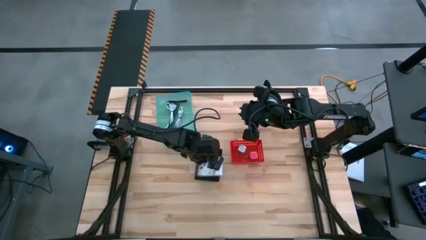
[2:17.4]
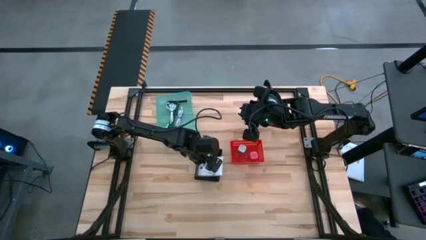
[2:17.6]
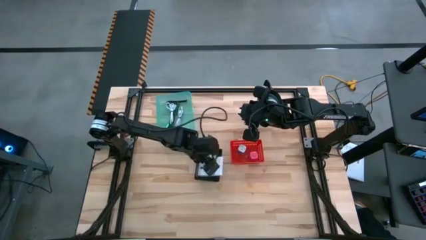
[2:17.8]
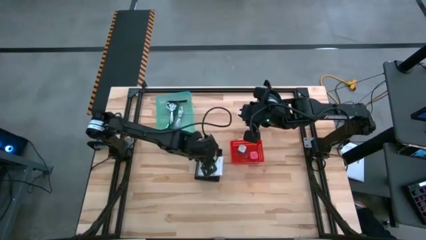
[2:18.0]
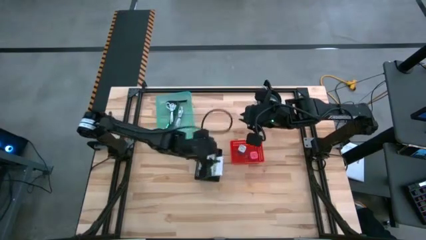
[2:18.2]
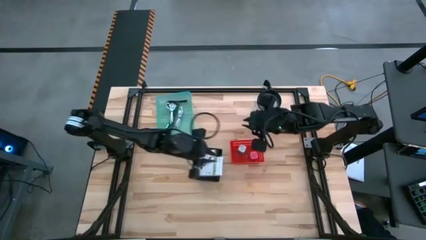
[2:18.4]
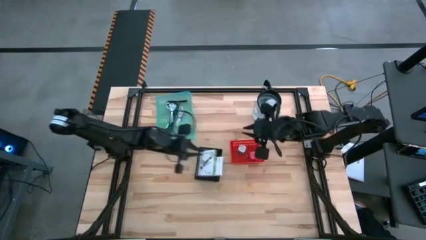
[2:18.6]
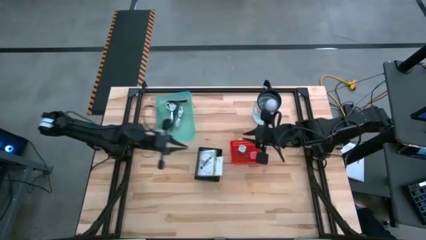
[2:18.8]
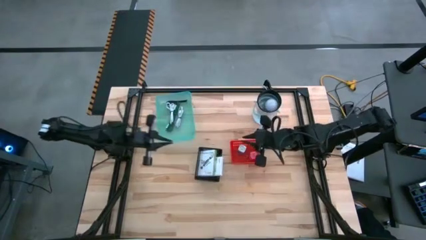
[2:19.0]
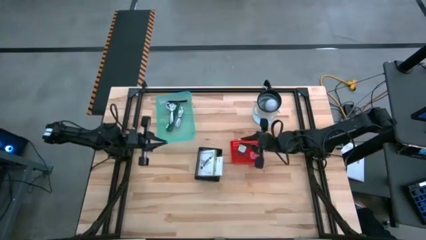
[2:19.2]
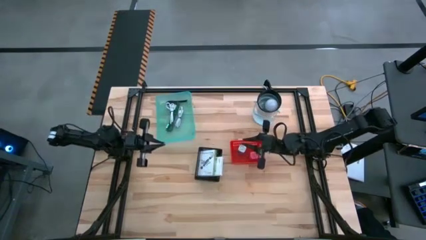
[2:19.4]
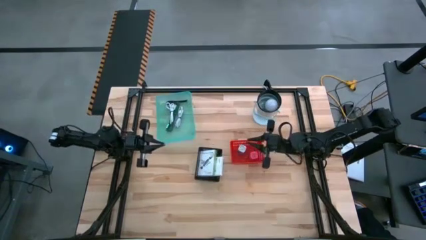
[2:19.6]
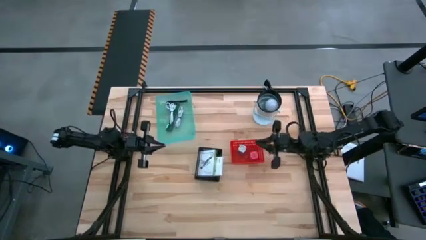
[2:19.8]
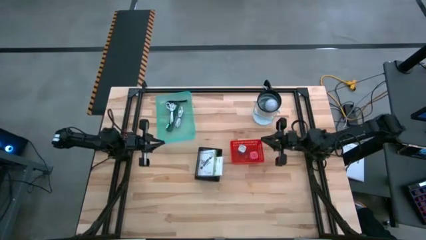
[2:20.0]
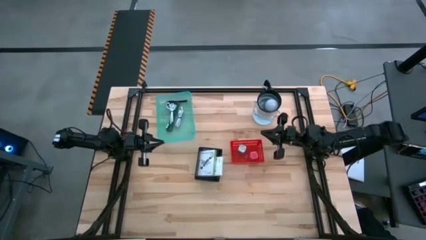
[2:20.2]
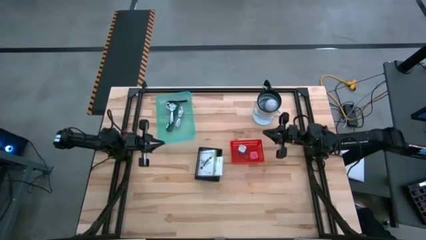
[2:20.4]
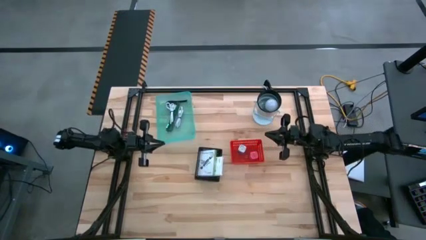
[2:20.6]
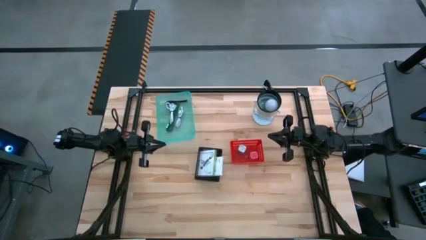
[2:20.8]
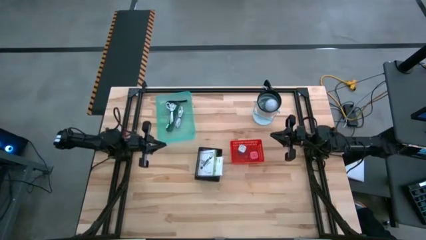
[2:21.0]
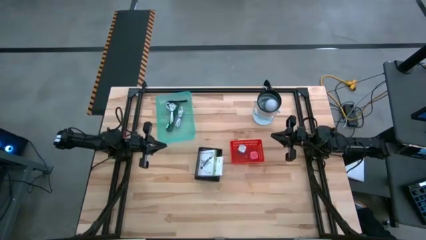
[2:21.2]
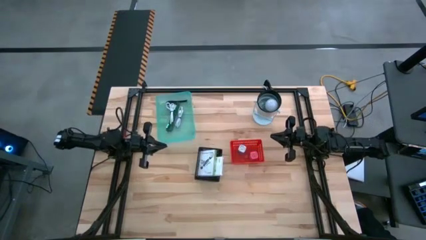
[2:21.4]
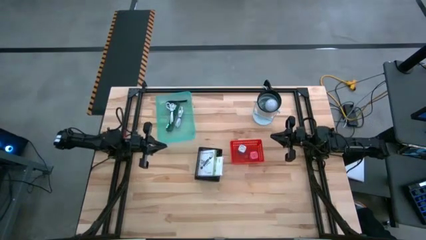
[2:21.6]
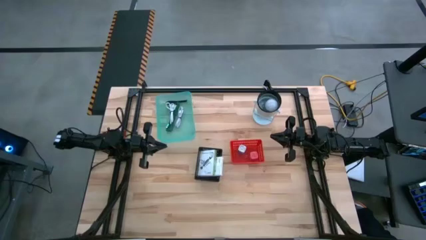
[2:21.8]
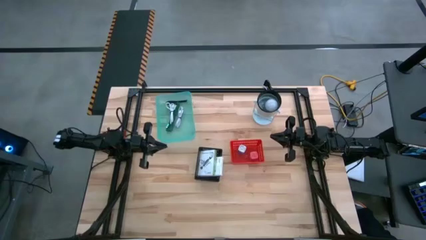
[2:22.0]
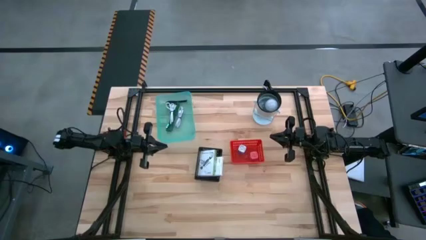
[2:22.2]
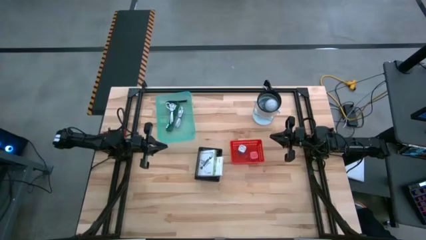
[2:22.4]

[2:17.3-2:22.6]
Task: Pick and place items into bin
Return to Home Position

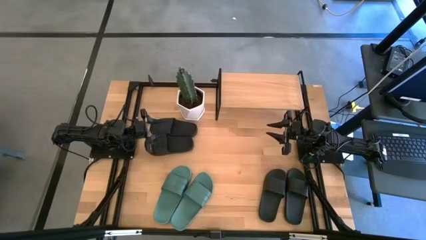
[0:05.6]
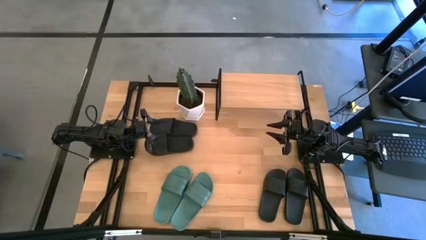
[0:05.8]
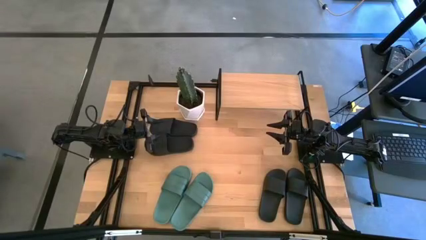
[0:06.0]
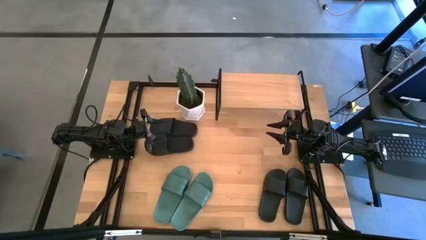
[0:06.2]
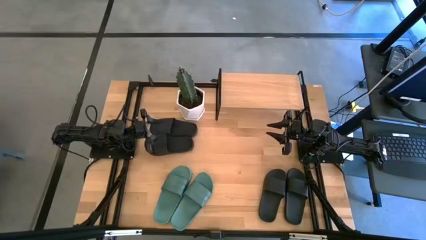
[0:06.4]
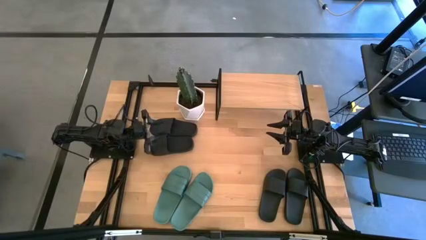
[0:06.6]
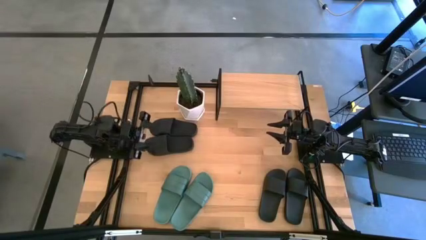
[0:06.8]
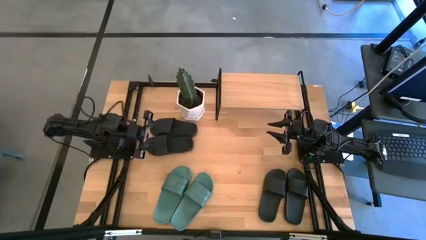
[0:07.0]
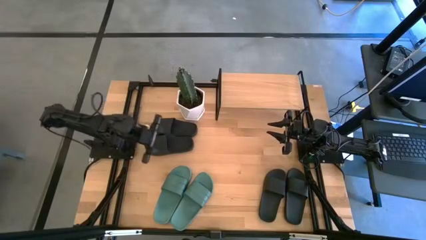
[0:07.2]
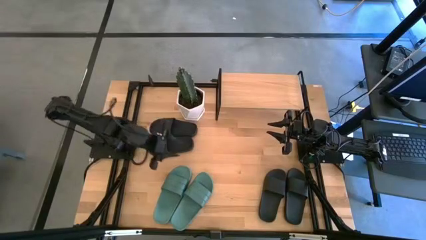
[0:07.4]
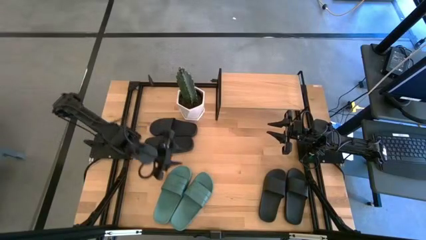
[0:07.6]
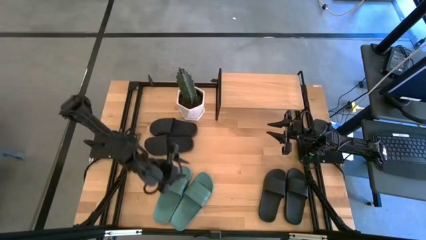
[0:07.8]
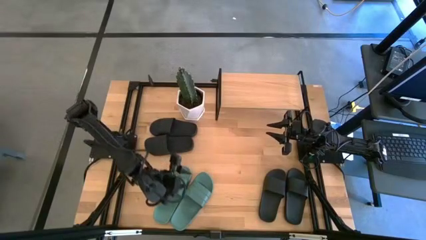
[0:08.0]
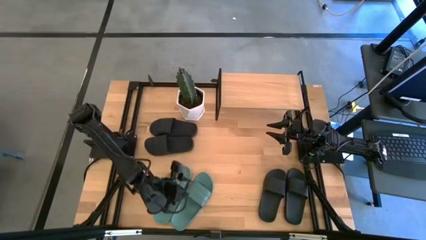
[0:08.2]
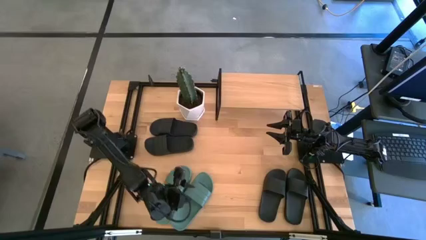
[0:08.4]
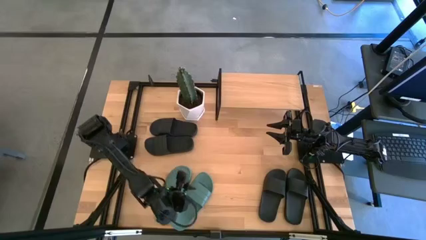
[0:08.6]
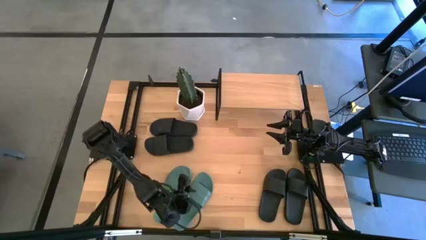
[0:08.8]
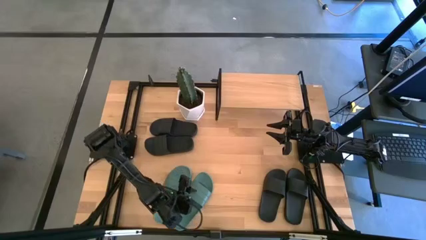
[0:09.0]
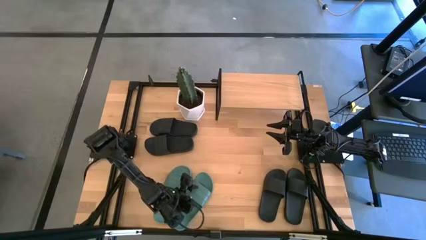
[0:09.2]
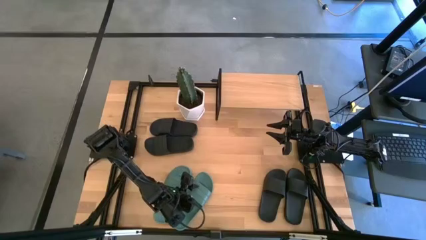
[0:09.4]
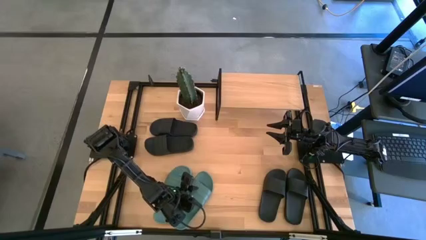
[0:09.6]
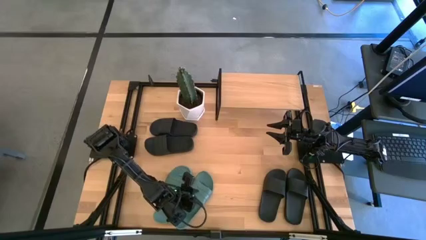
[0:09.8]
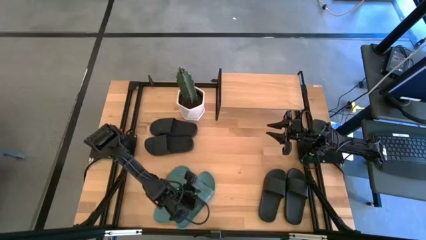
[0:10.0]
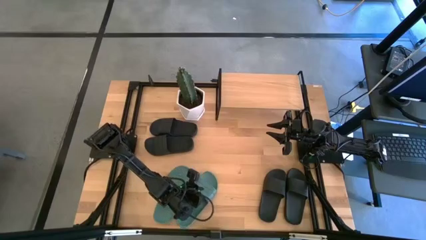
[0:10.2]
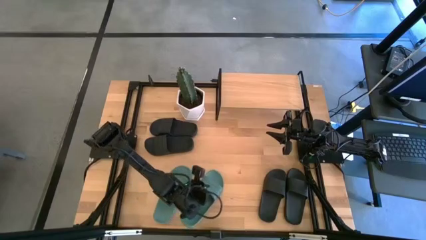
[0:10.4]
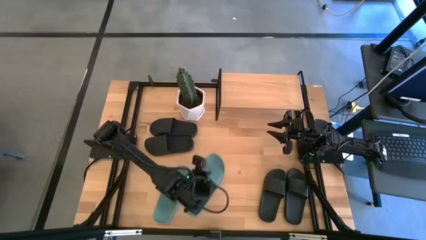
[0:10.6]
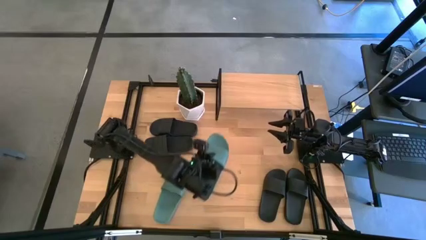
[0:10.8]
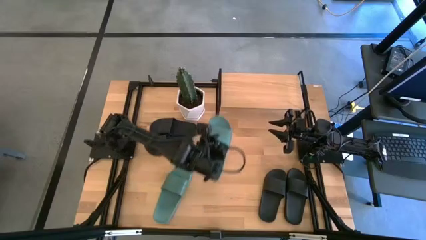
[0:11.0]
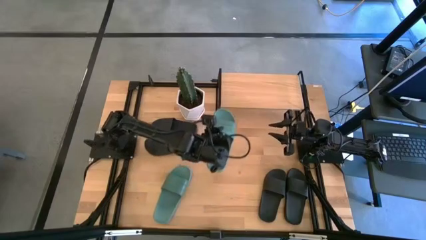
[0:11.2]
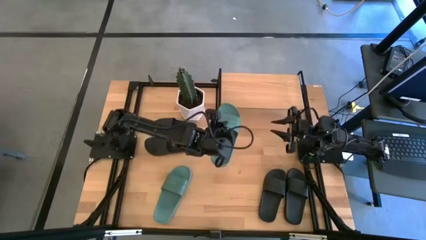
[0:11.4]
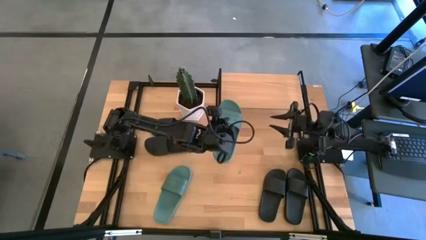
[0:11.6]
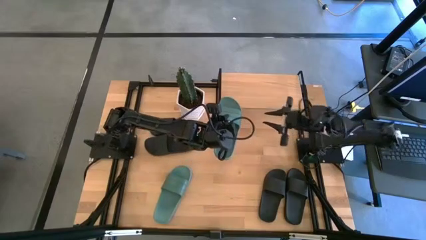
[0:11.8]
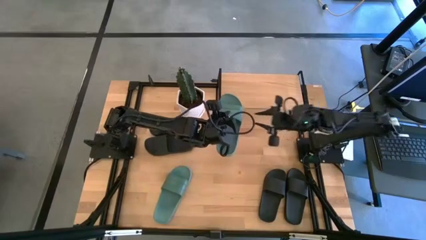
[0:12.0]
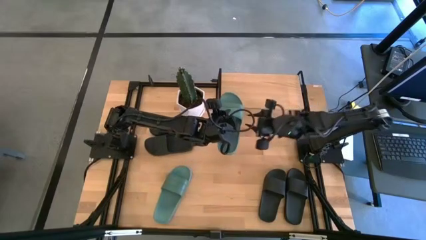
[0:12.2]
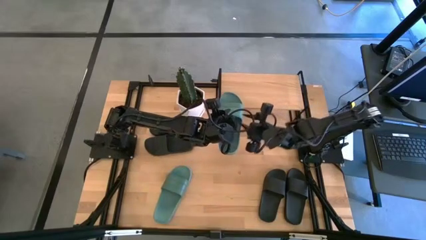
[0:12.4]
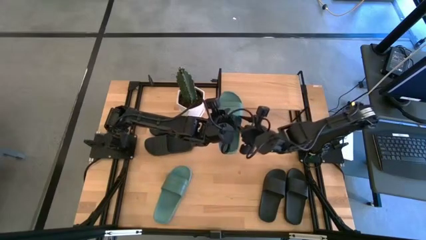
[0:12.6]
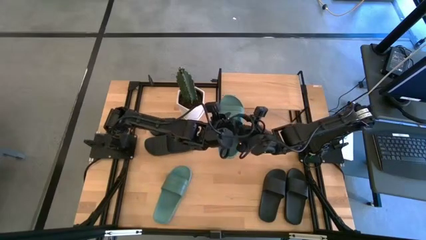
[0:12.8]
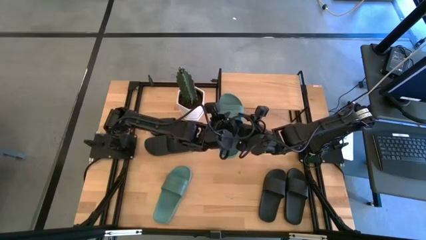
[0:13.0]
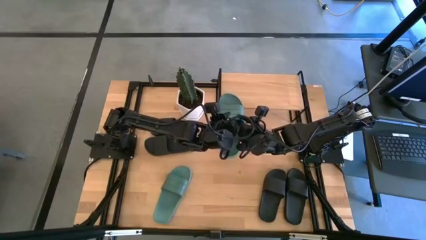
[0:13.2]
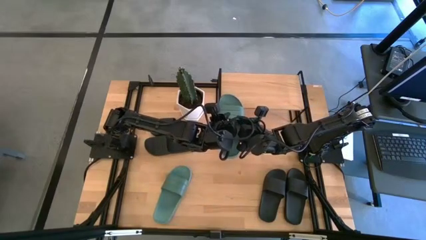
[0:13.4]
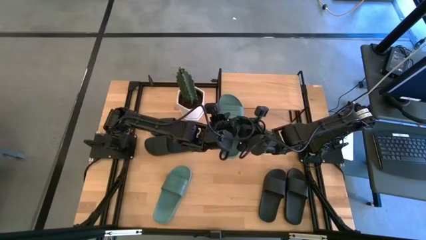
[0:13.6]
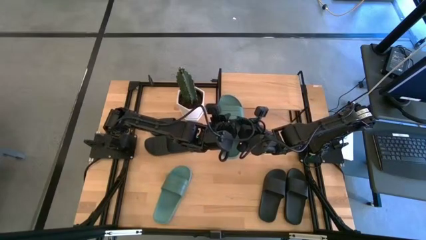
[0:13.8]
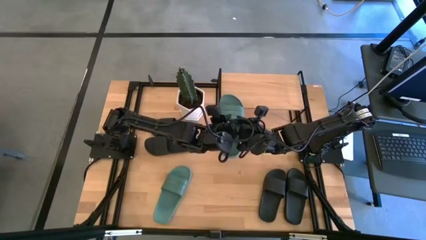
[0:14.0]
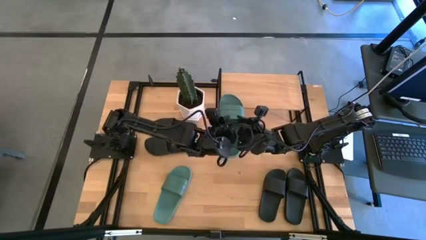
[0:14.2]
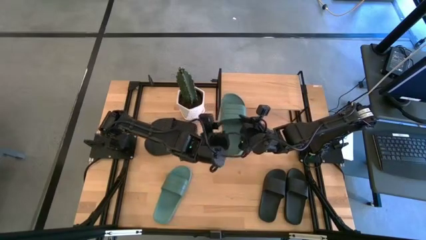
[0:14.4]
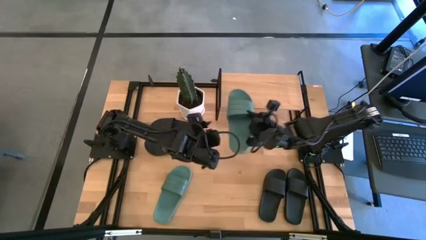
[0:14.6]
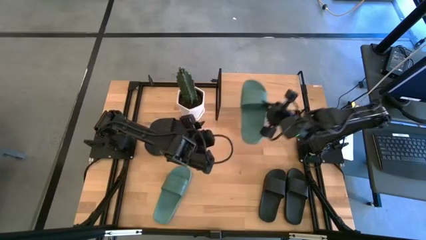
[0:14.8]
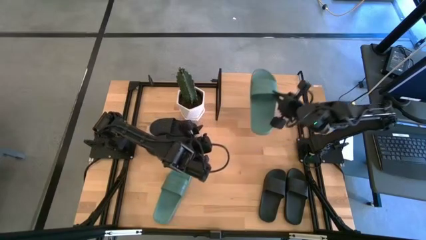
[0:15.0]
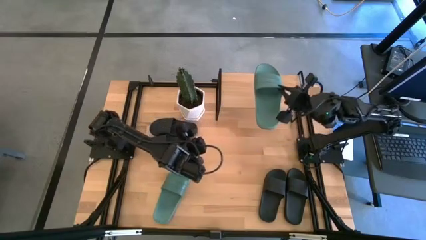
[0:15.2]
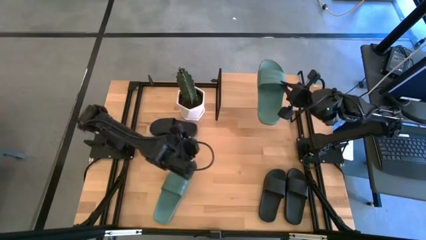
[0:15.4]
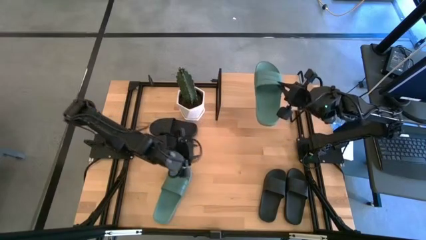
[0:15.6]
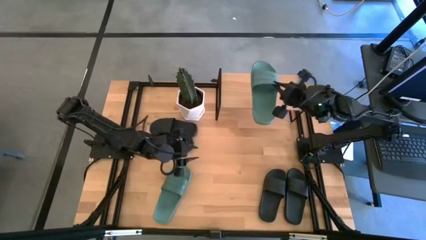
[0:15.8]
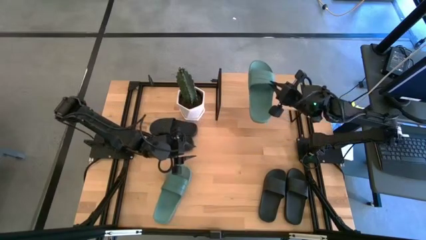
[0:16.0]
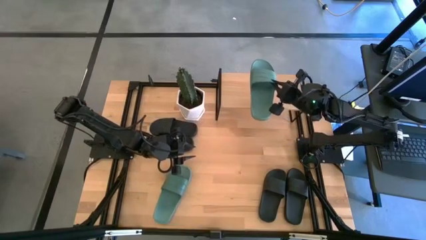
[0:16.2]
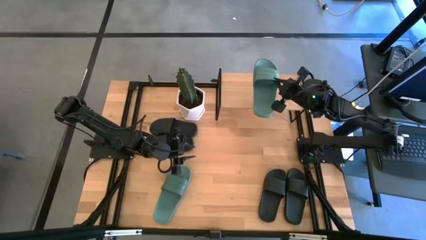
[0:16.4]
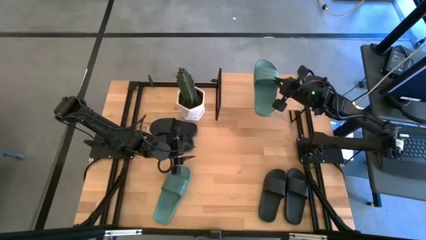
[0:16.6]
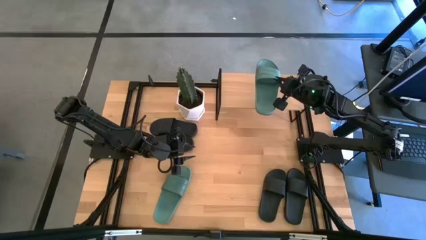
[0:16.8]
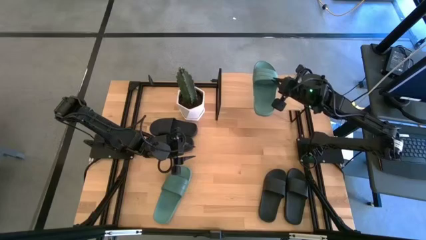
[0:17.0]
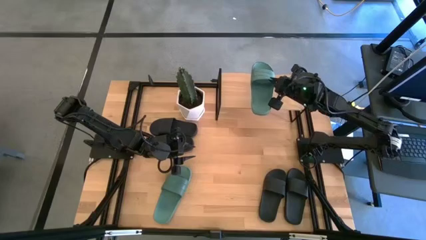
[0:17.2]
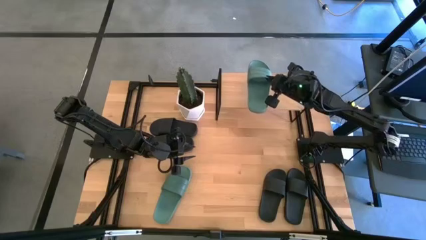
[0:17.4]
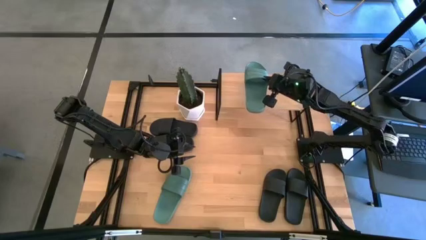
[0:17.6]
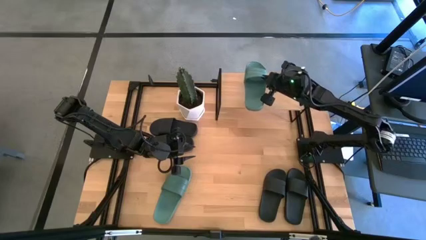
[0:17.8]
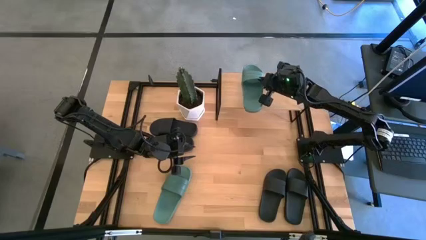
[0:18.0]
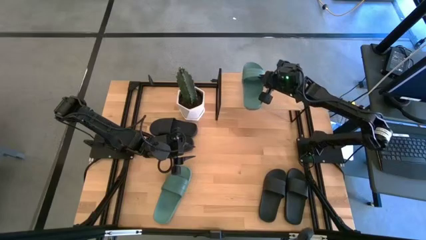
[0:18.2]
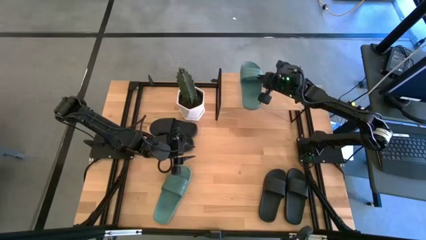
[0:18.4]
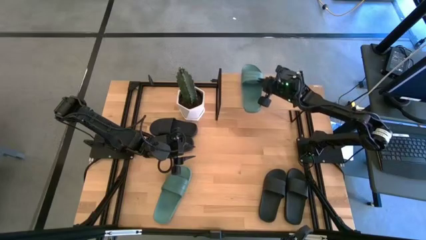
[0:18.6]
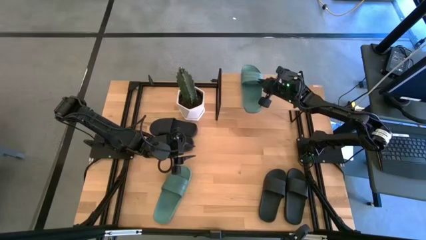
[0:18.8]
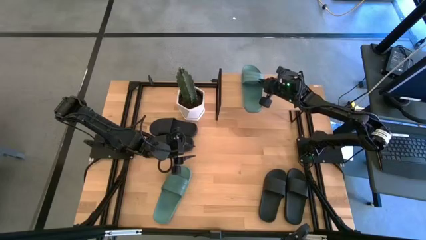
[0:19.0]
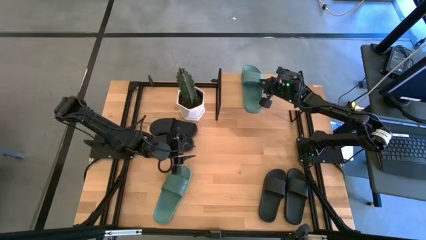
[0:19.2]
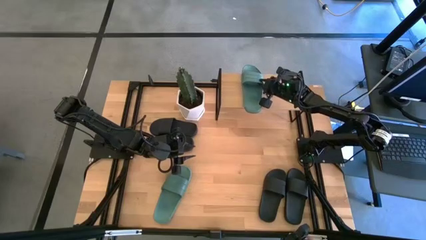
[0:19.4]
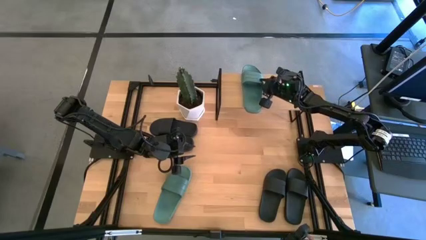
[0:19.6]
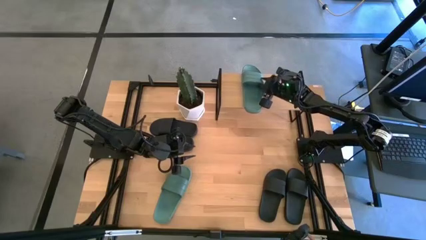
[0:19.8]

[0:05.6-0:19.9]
Task: Pick and place slides into the shelf
Put the green slipper on the shelf
